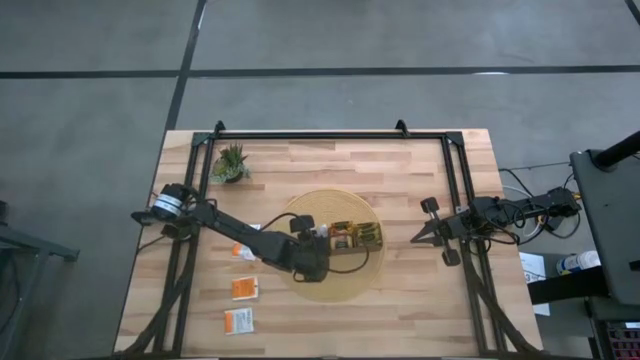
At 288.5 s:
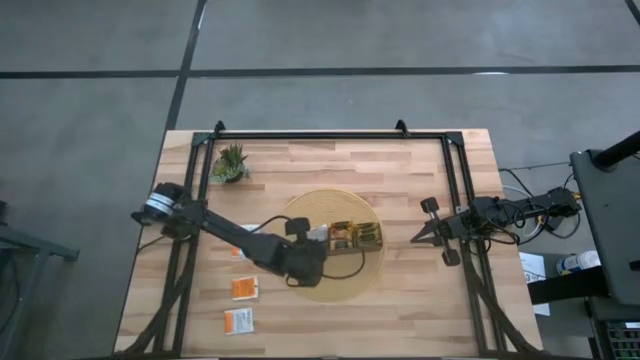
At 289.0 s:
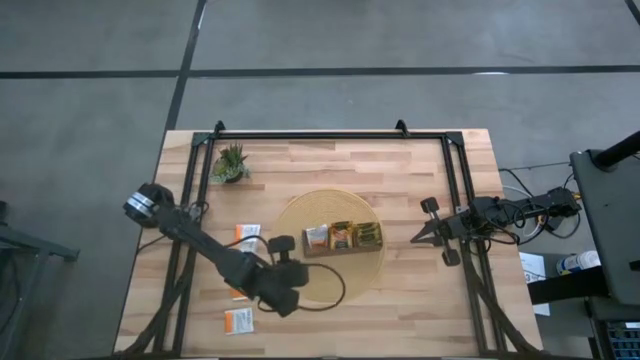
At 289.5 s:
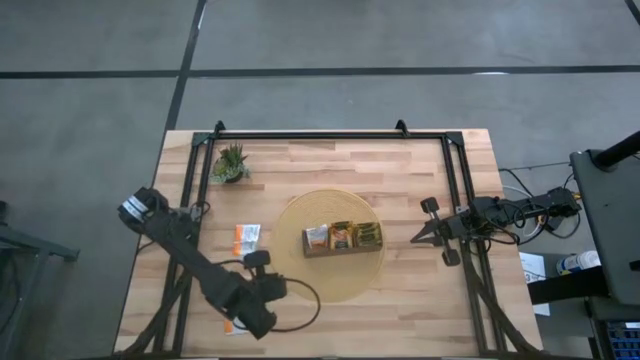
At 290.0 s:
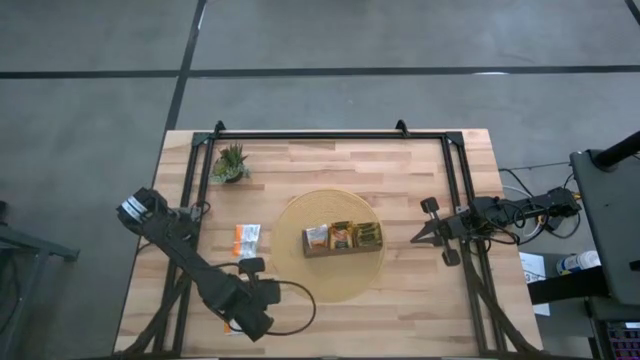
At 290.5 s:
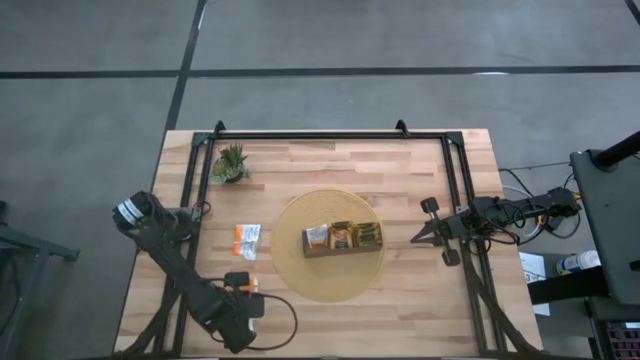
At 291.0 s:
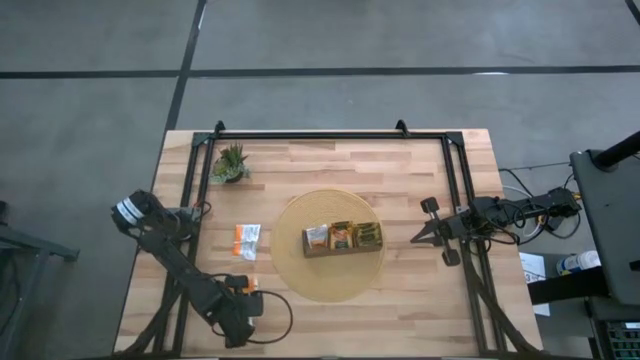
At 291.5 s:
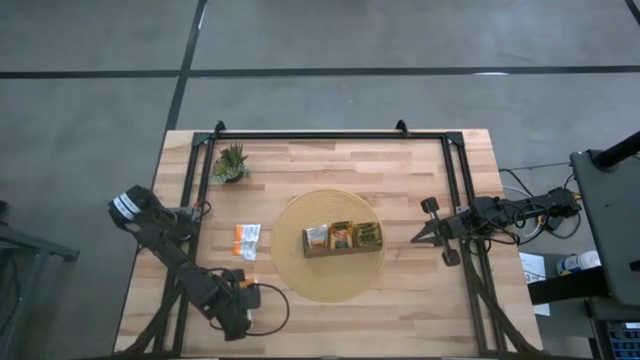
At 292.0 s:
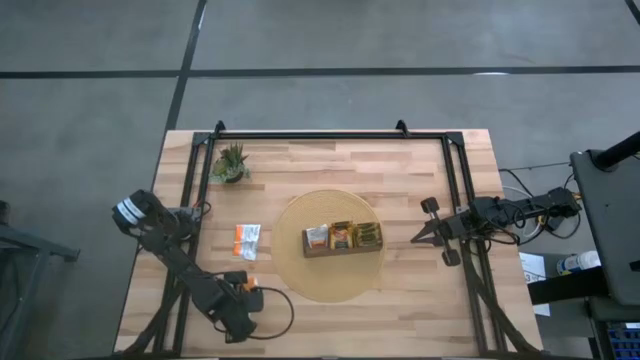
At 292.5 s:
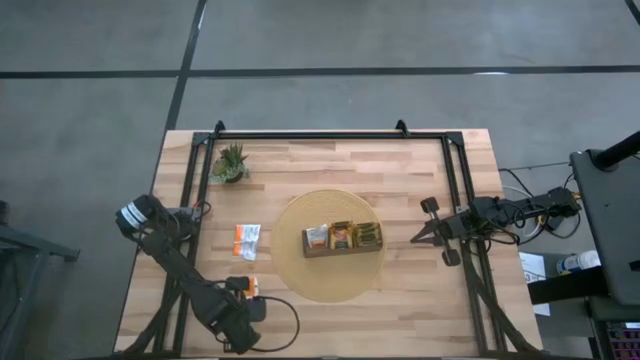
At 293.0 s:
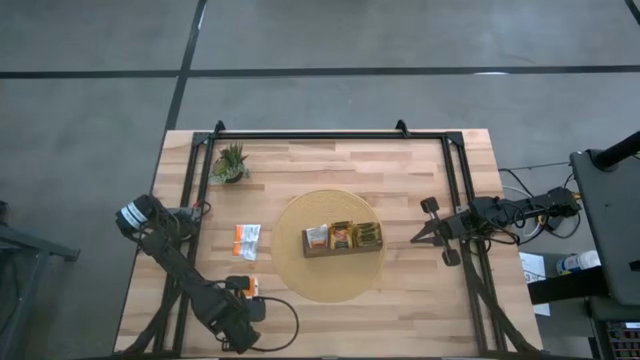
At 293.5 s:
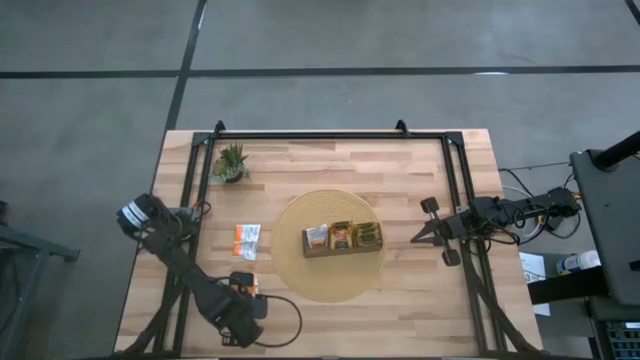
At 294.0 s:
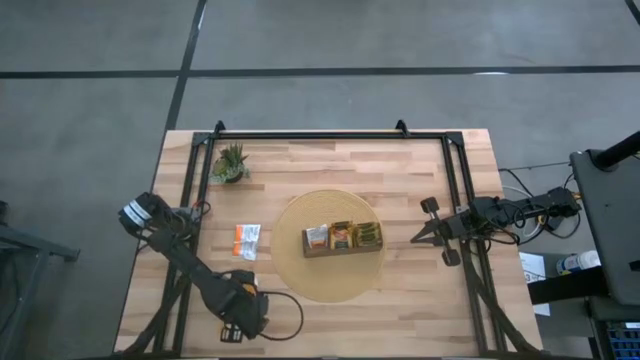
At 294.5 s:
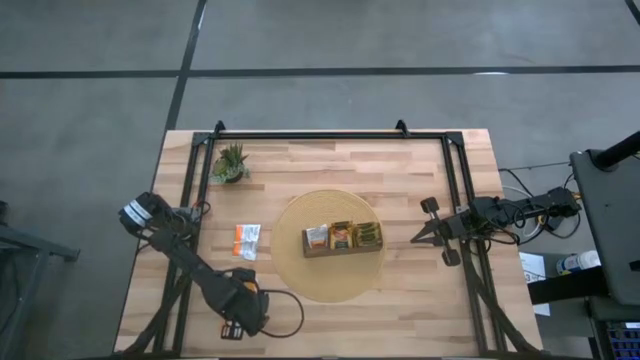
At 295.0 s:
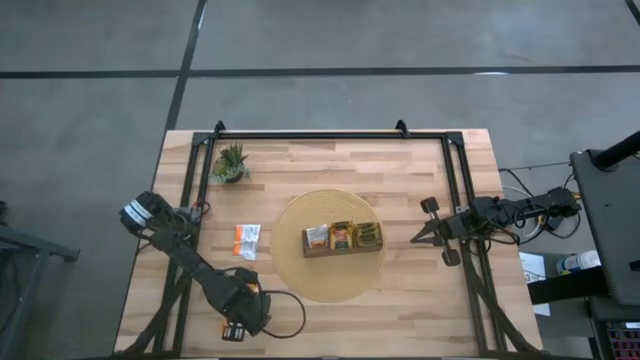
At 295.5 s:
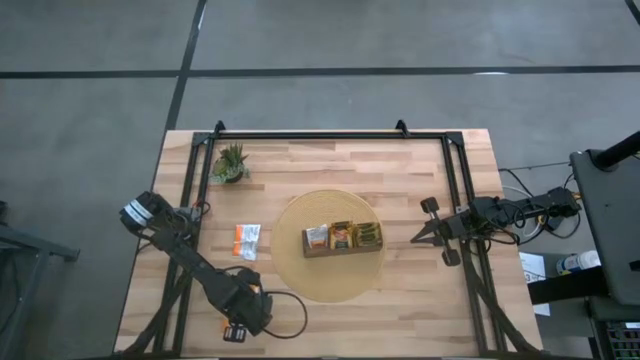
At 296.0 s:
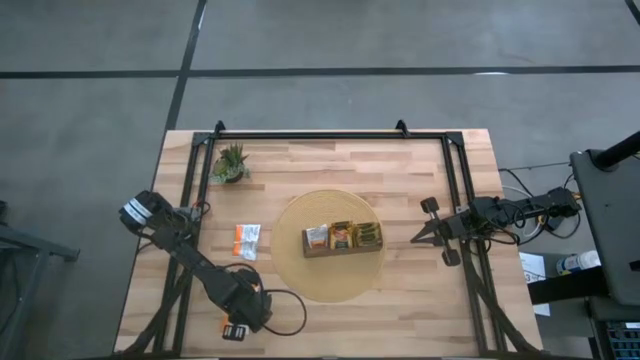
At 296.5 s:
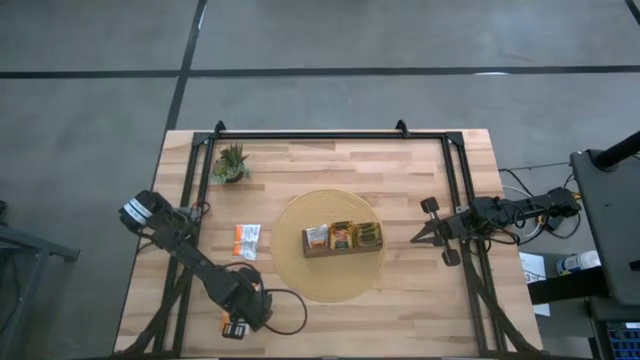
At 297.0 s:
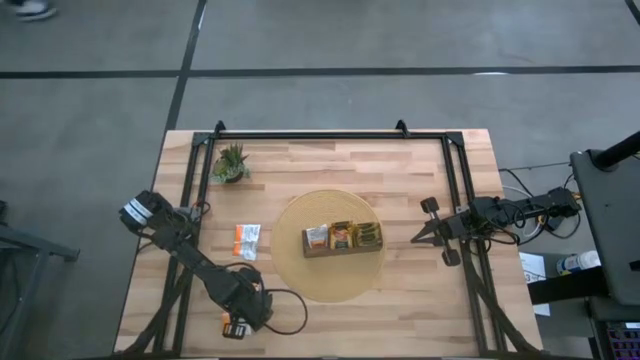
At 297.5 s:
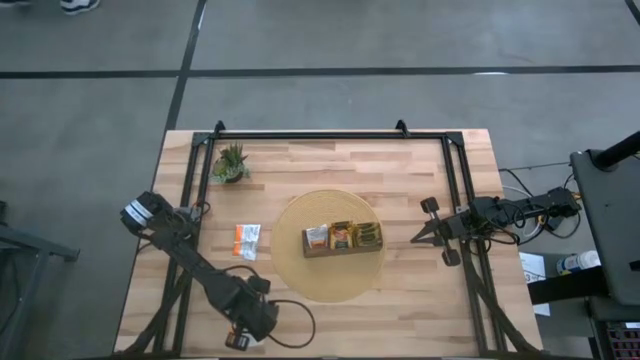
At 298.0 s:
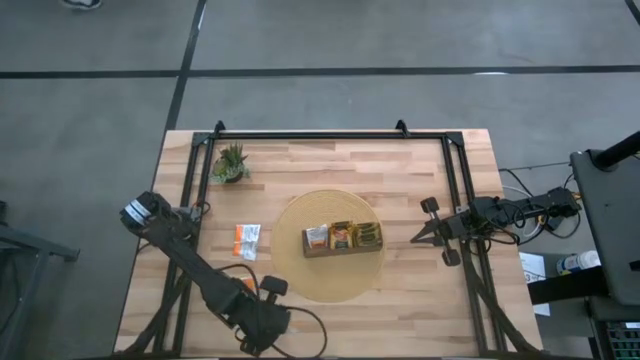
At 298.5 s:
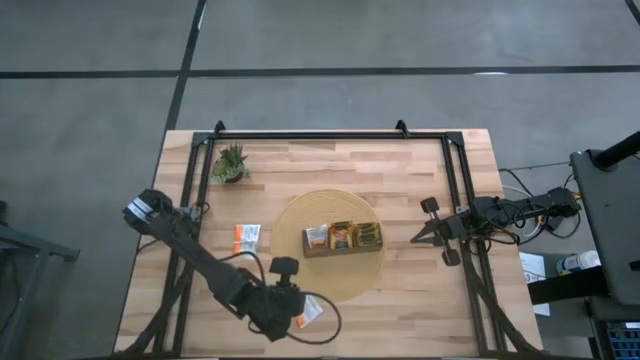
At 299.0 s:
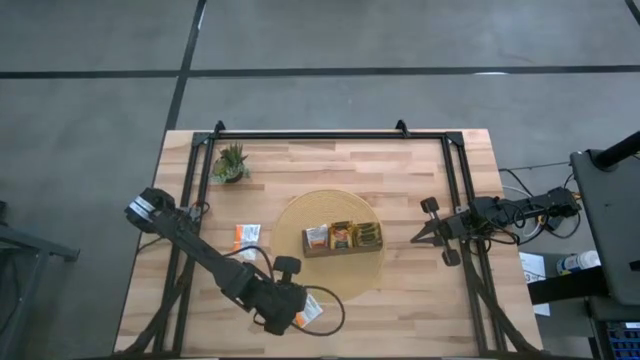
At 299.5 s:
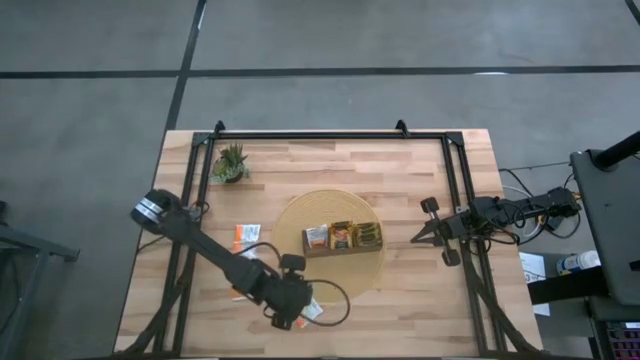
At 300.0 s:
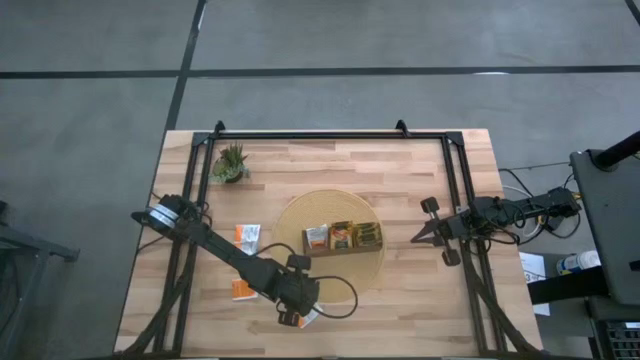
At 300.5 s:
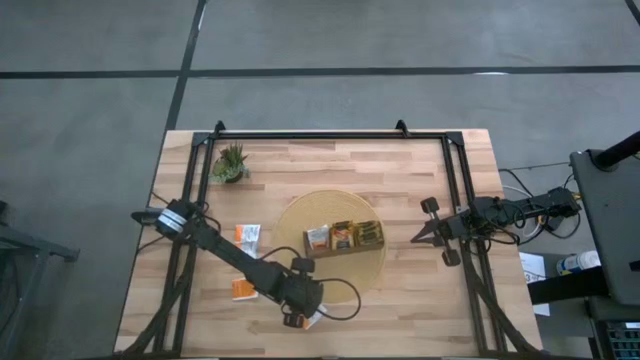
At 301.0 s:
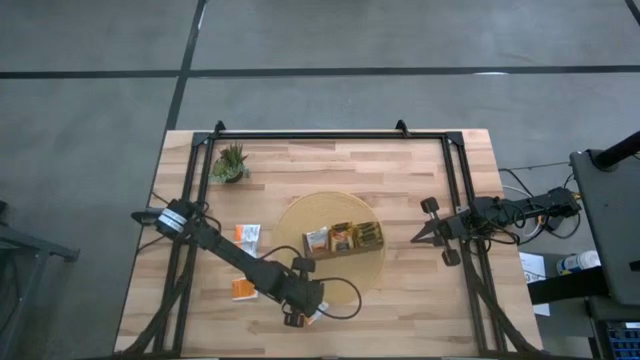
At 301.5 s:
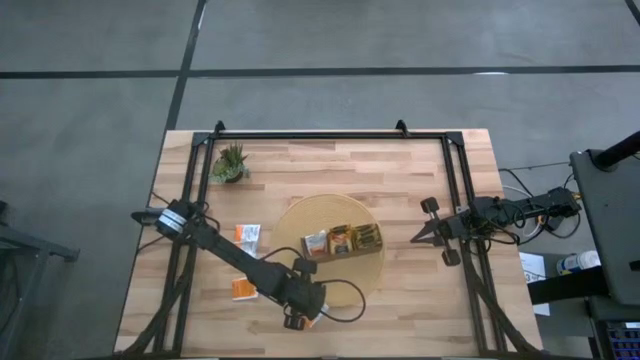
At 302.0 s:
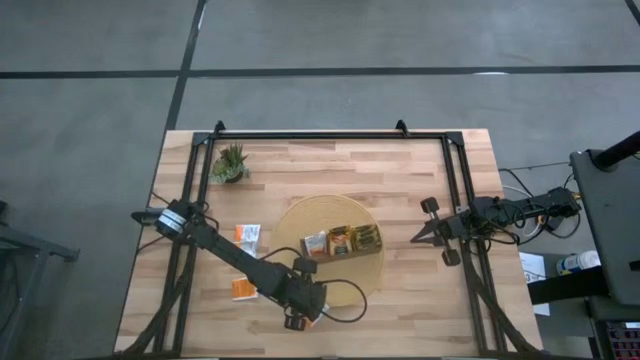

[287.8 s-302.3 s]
Task: Pick & Place Tea
Put the white tea bag into the left of the wooden organizer

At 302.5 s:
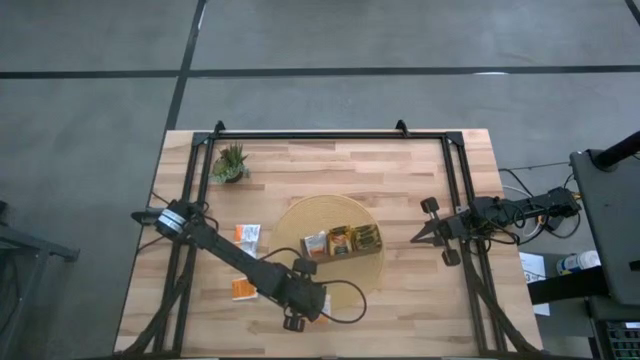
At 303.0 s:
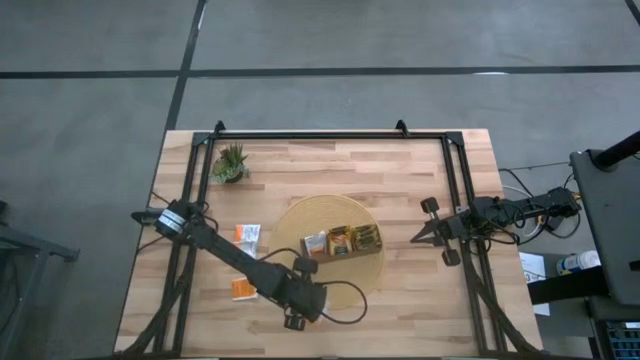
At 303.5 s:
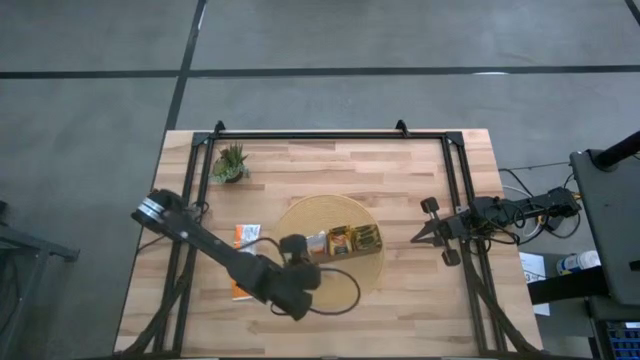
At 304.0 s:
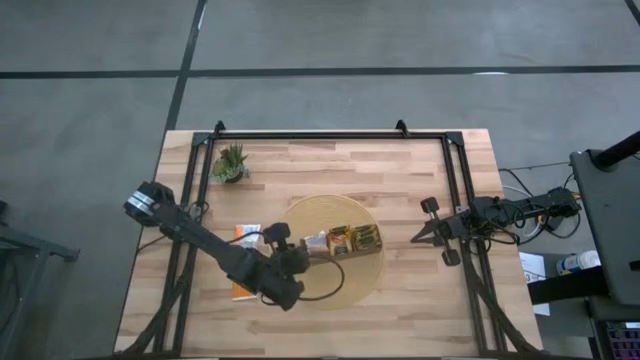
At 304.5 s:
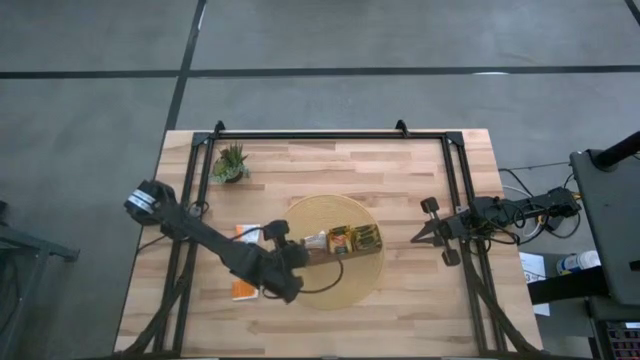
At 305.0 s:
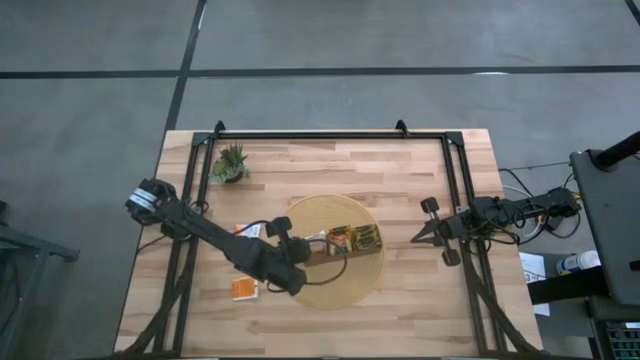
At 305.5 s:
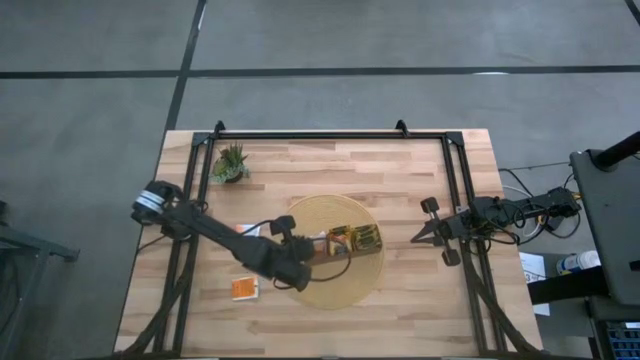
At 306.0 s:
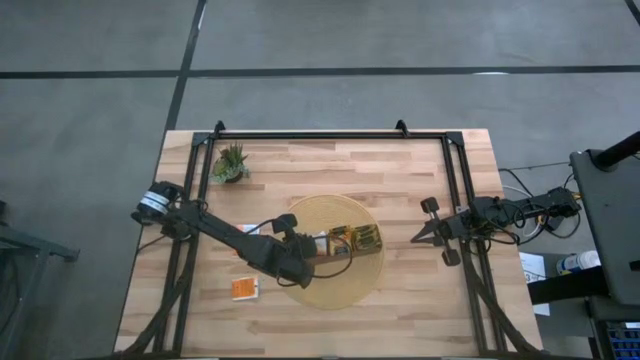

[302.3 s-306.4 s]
Put the white tea bag into the left of the wooden organizer

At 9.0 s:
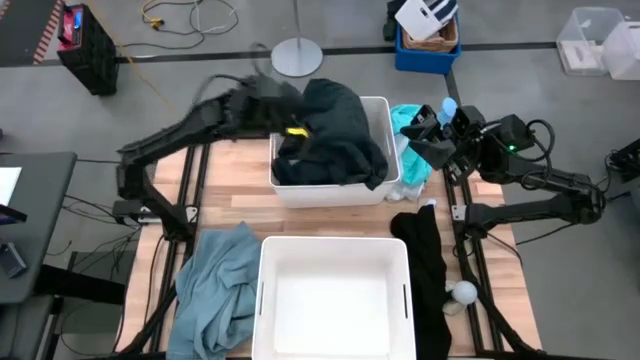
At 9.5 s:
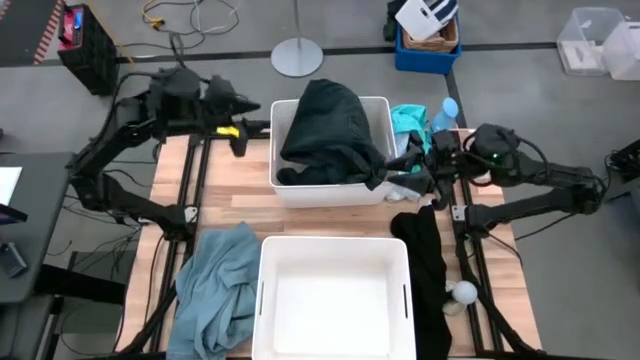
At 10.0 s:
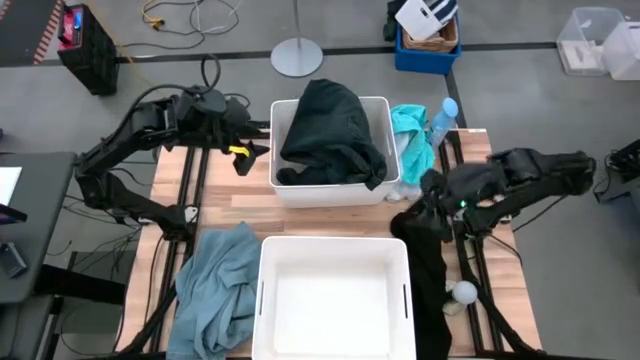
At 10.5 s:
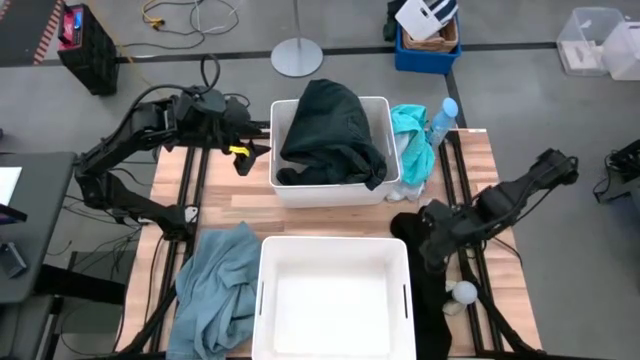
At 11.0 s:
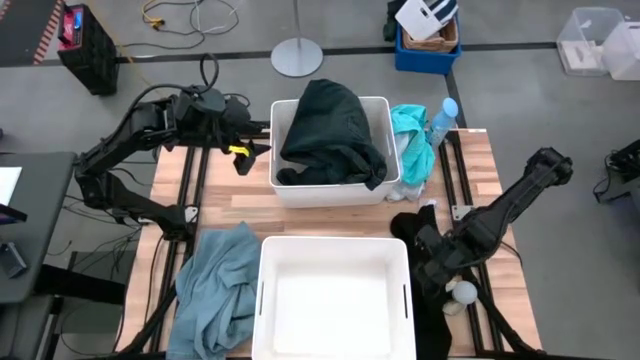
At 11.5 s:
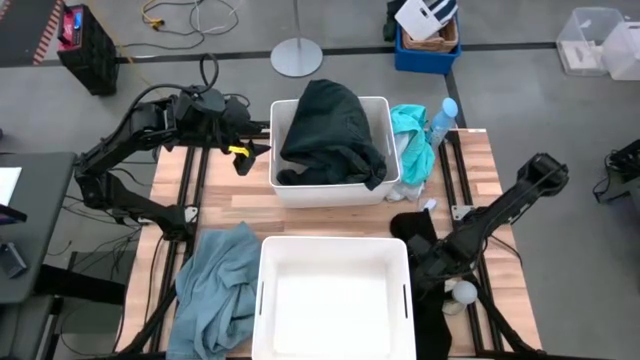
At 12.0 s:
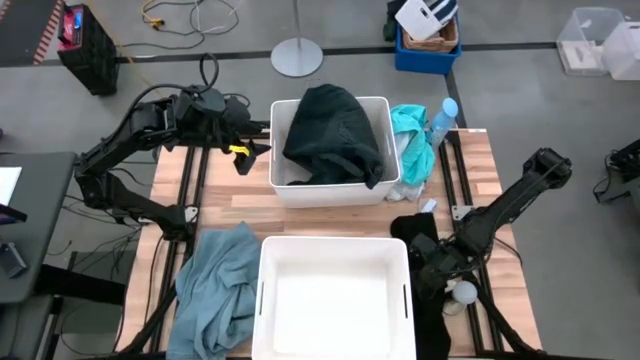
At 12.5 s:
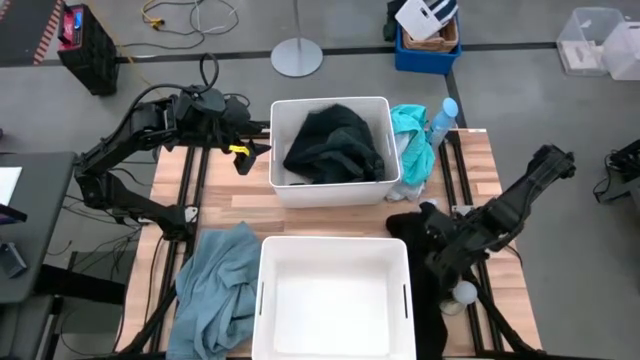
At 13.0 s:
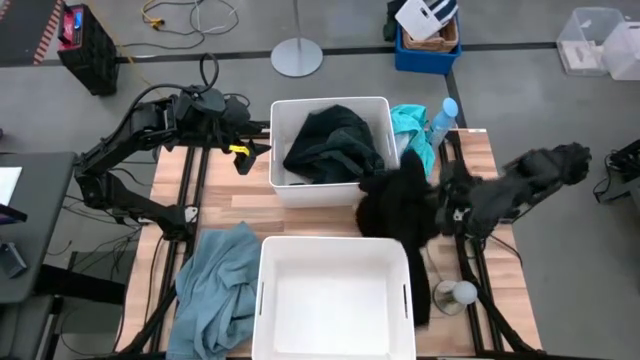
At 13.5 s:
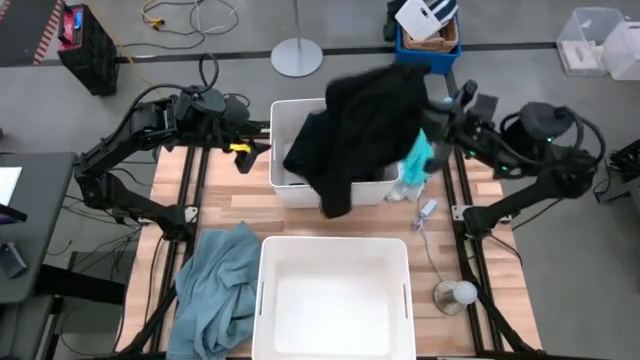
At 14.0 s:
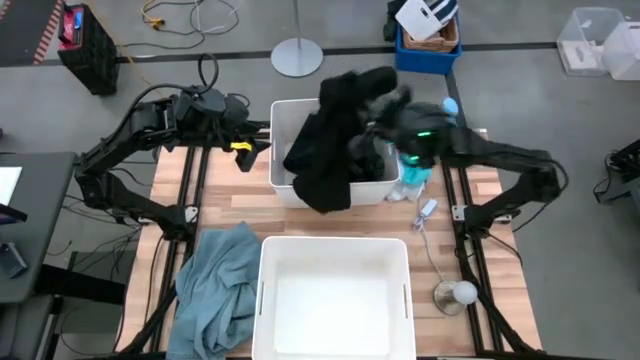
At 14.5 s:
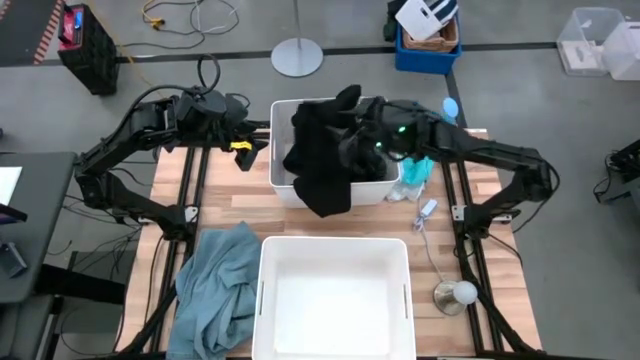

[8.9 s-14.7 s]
Task: Sort clothes
Put the black shirt into the top white bin
